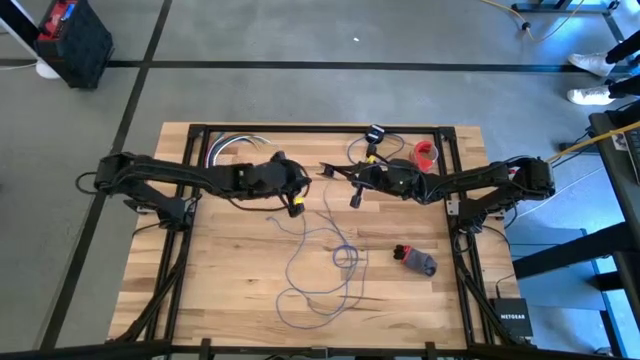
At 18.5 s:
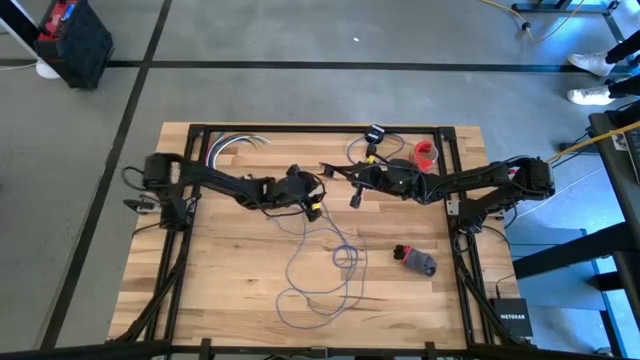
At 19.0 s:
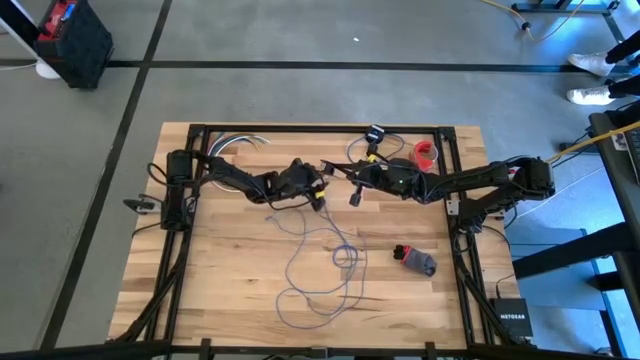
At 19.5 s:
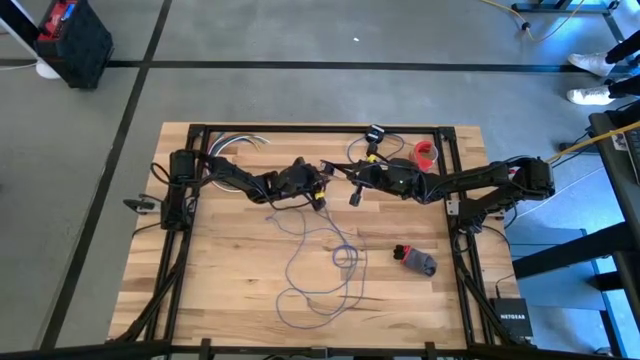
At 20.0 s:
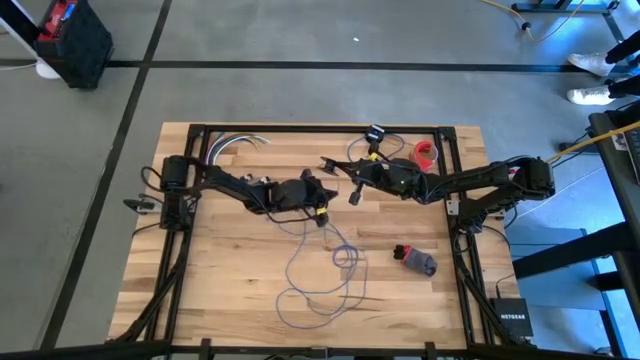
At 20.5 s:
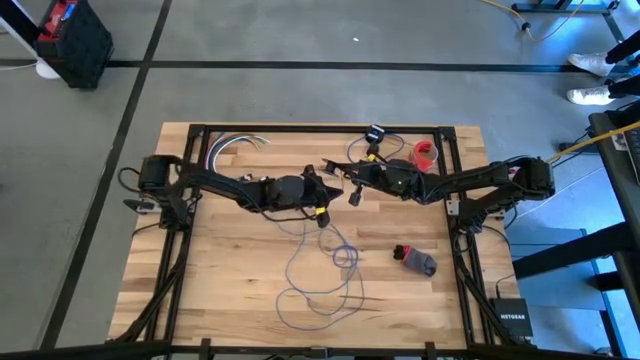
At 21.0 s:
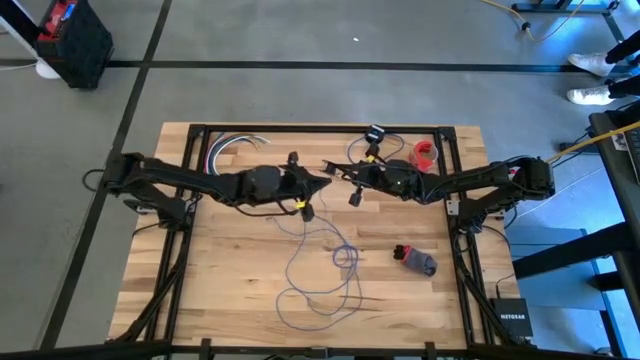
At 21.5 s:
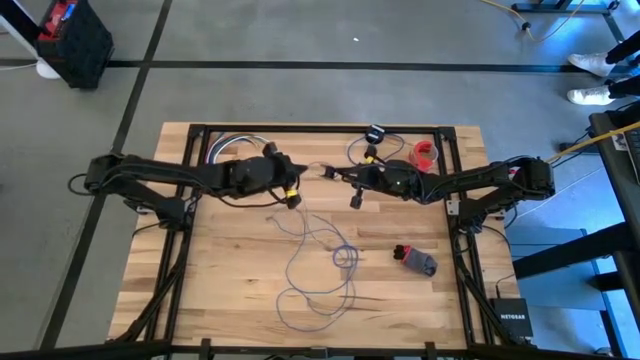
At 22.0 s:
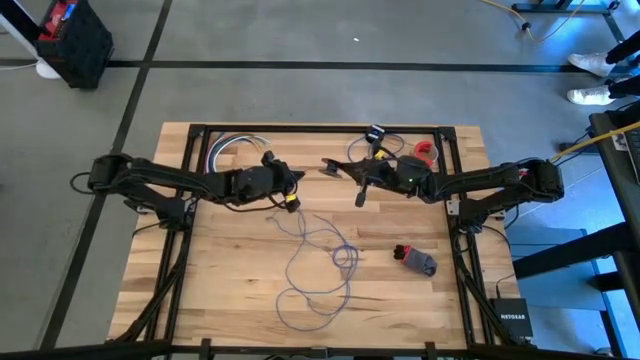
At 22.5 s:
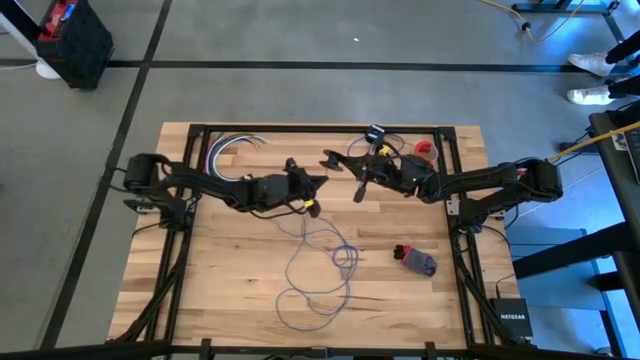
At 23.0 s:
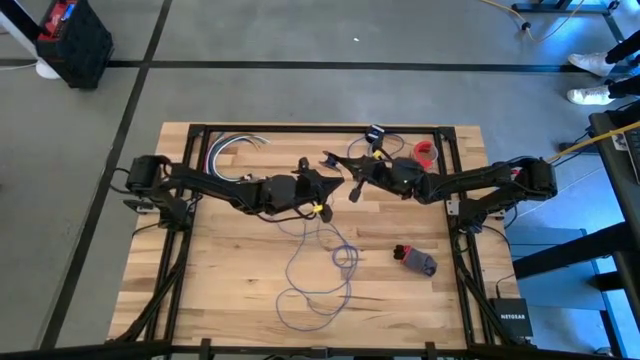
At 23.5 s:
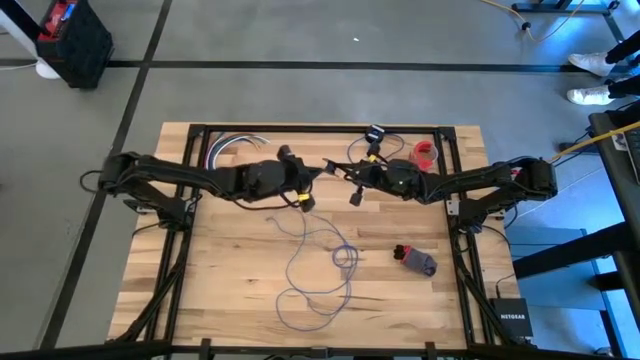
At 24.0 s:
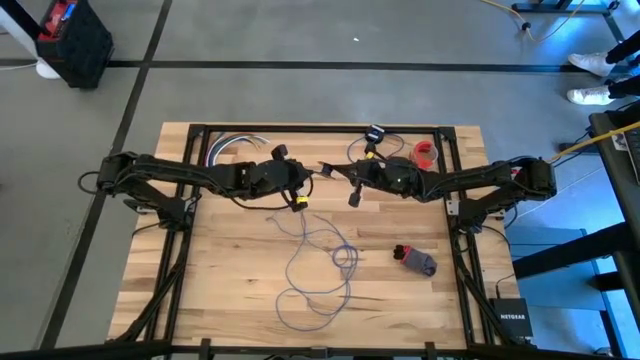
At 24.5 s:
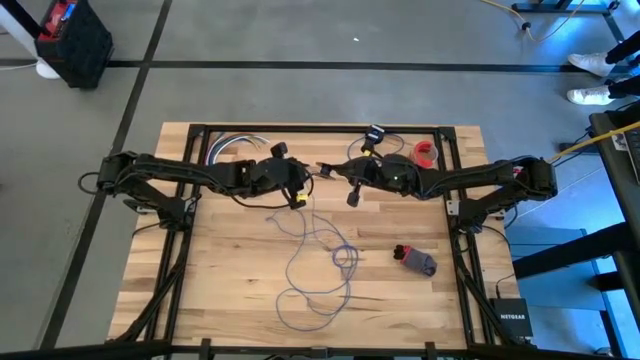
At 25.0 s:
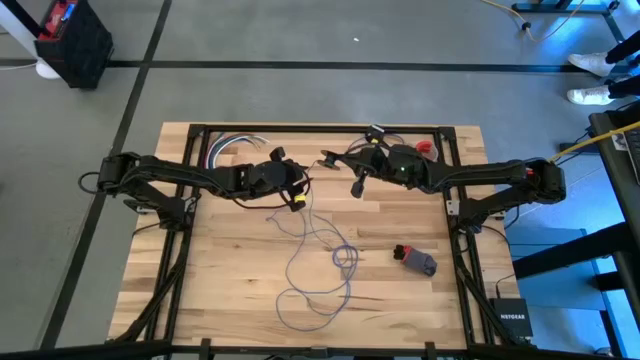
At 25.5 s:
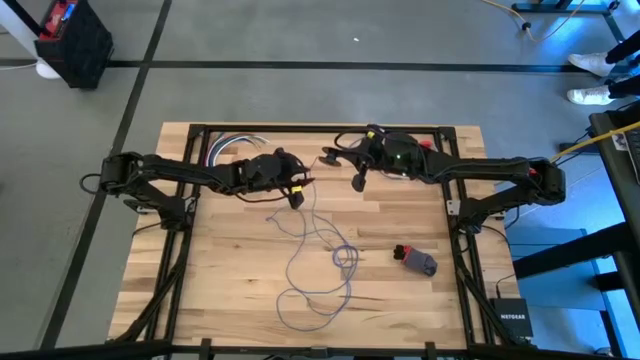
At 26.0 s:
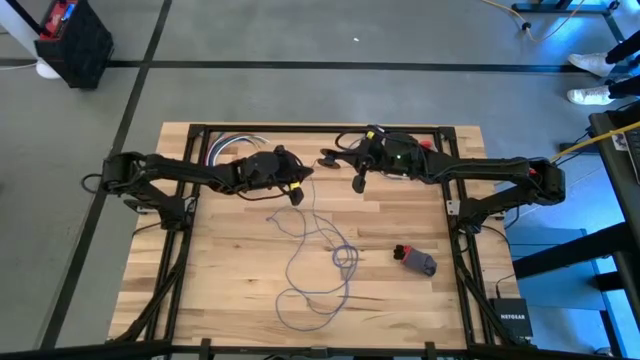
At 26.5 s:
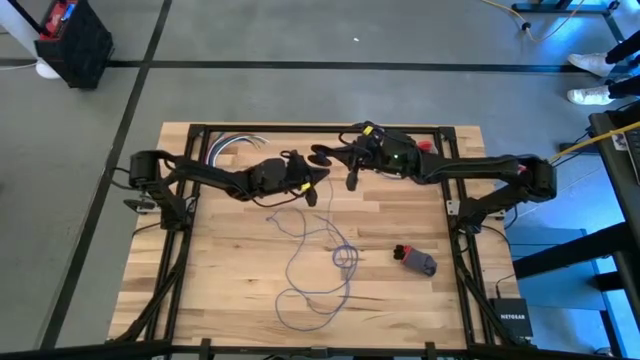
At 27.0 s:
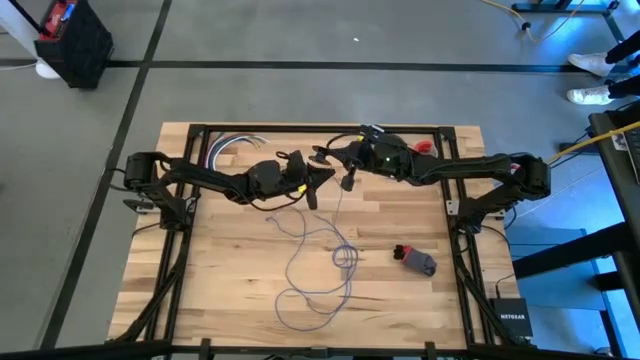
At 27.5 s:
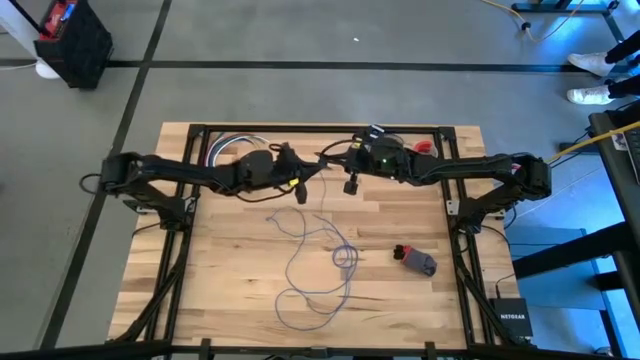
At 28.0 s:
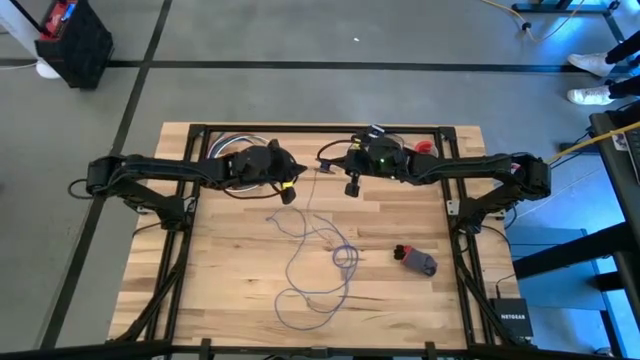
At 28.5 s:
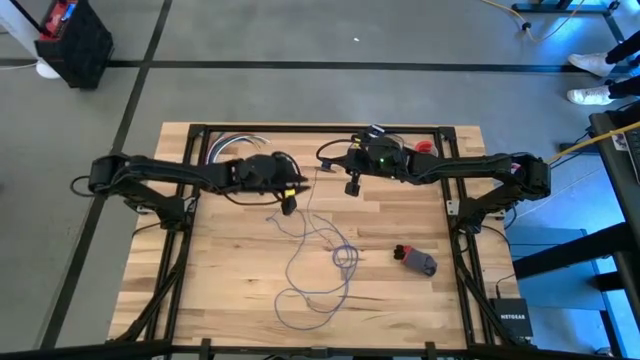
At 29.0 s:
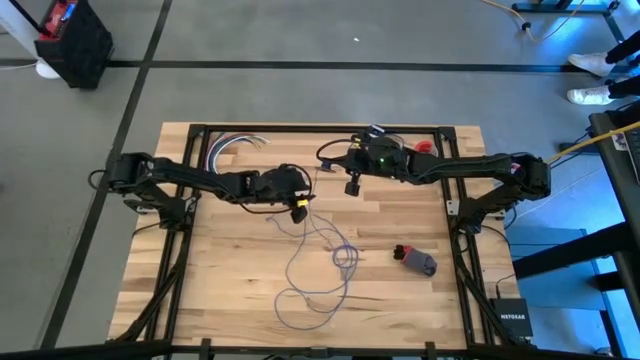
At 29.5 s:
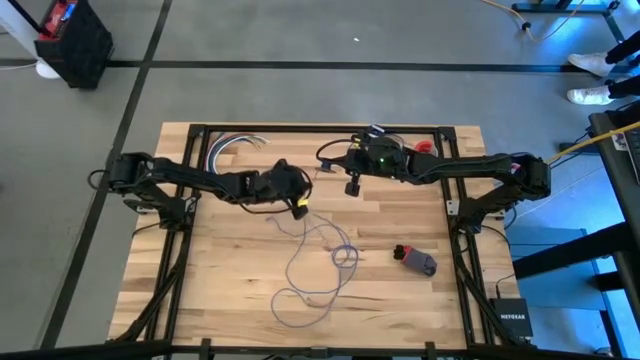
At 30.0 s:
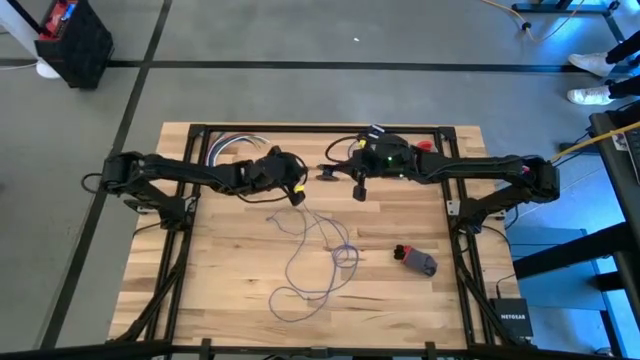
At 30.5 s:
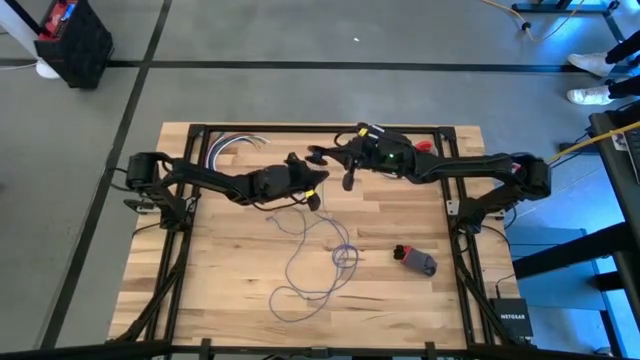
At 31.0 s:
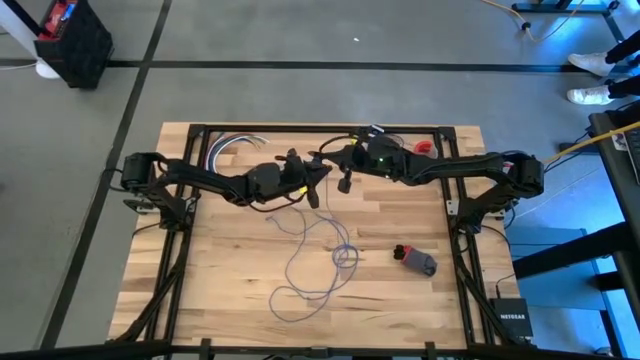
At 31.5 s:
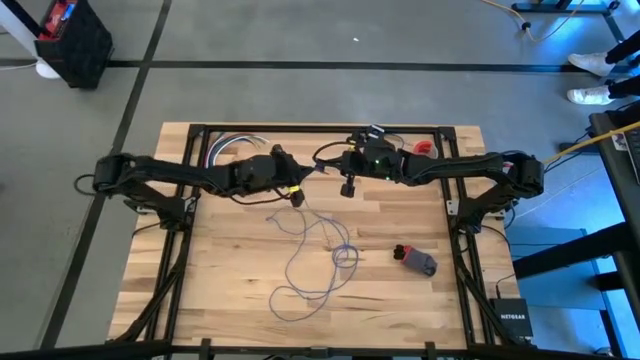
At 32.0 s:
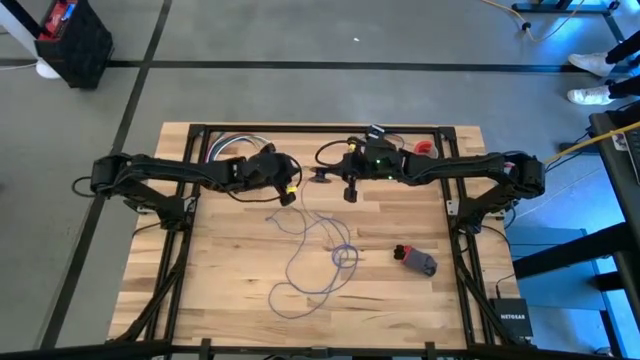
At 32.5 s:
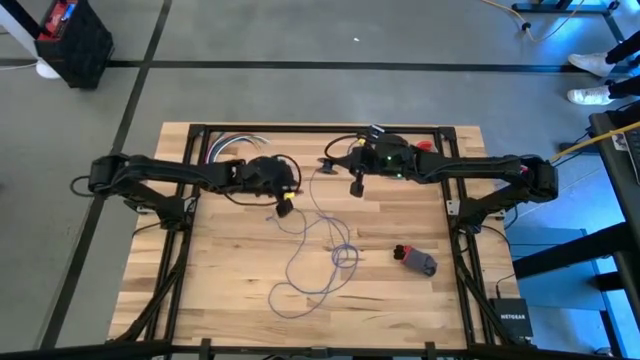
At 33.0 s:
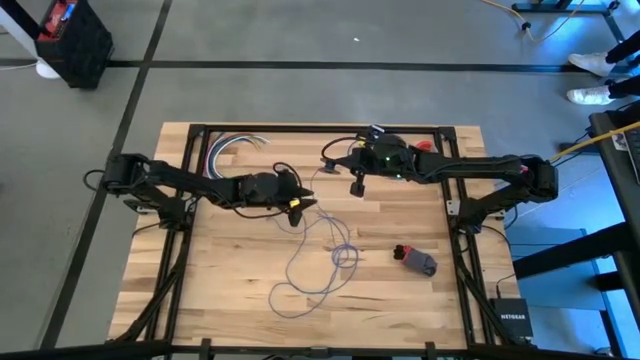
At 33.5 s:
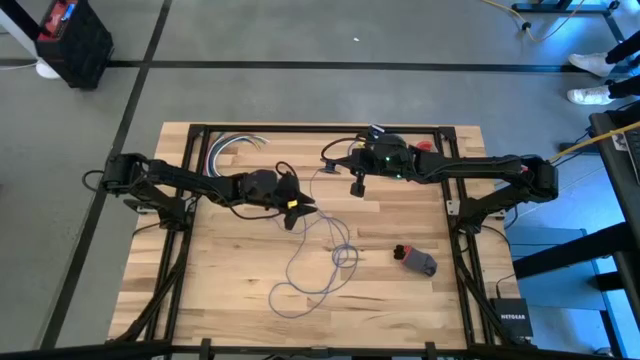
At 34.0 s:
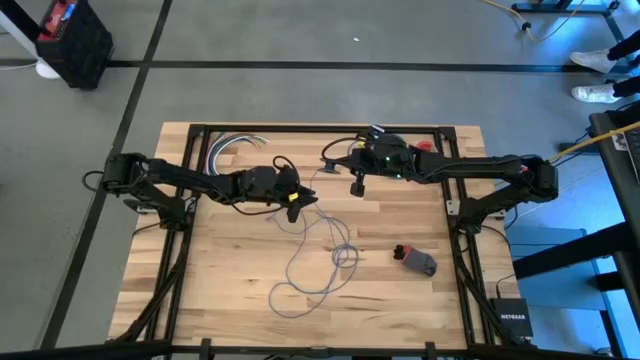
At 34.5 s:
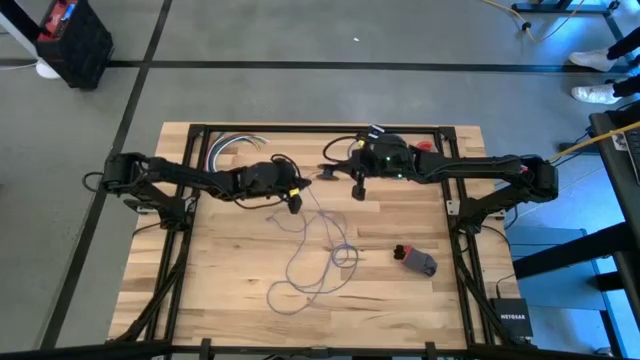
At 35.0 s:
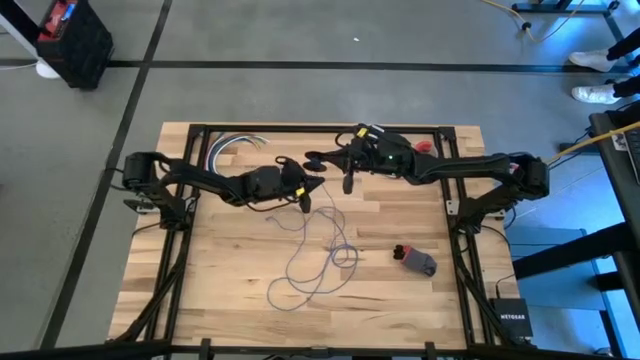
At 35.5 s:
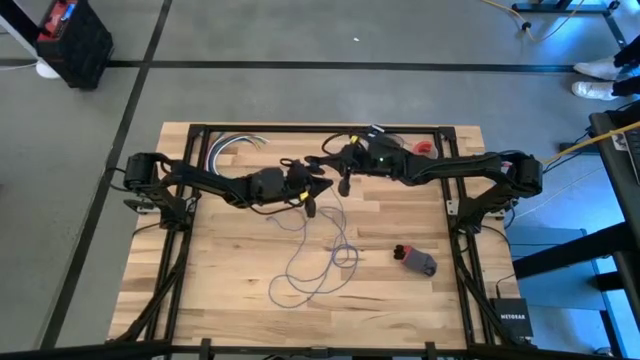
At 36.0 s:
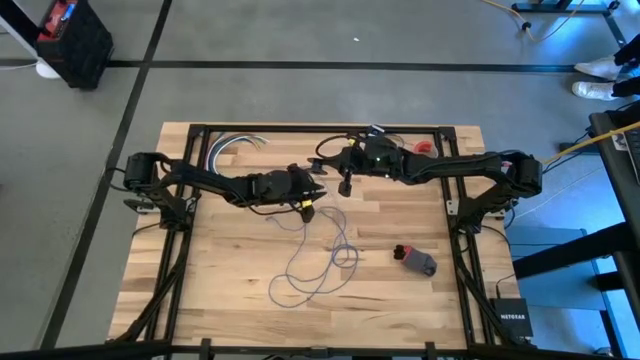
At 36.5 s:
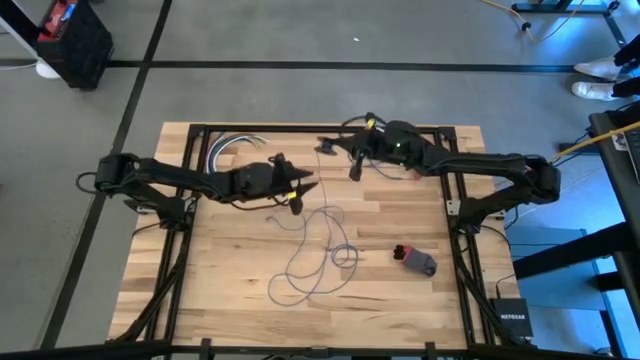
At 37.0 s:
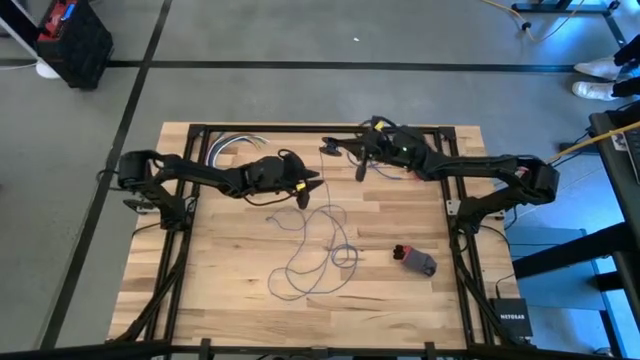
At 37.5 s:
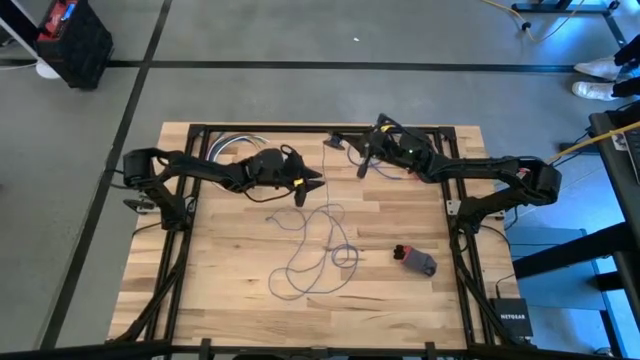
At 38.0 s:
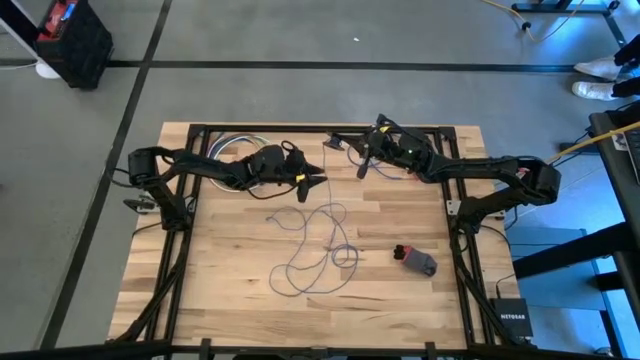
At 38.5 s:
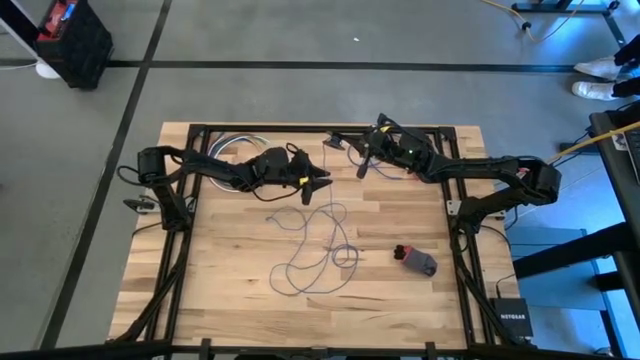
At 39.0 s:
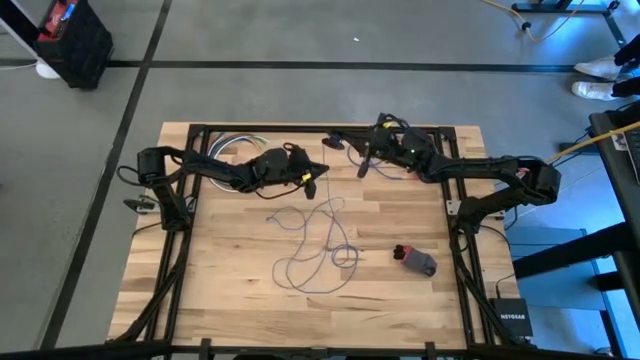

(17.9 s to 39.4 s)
Task: Coil cords
Coil the blue wire onto the spool
